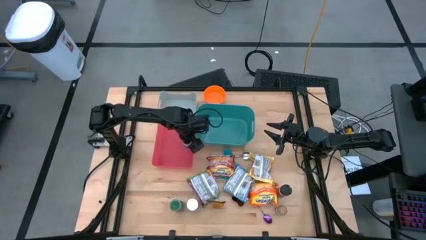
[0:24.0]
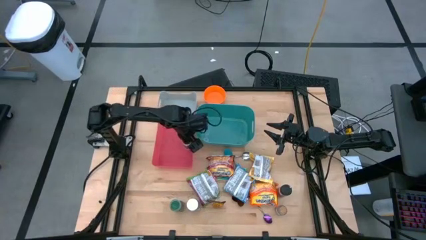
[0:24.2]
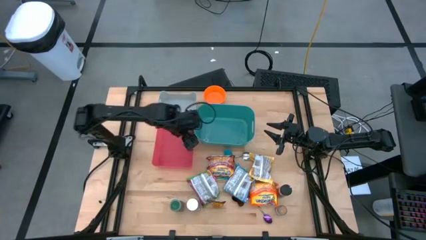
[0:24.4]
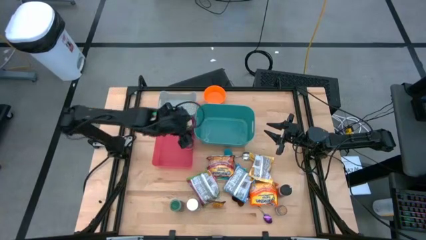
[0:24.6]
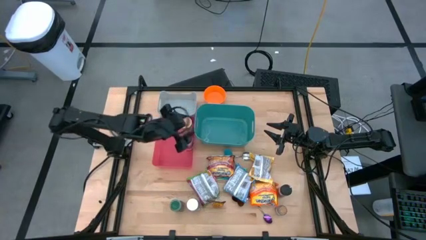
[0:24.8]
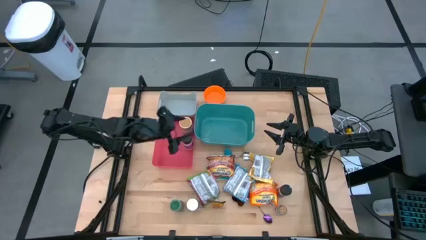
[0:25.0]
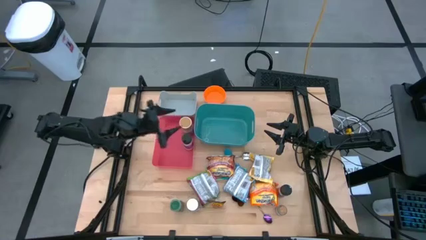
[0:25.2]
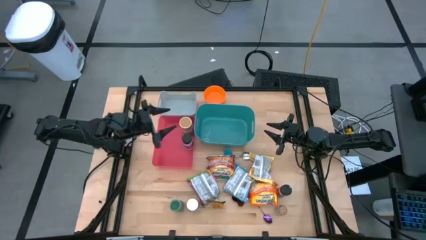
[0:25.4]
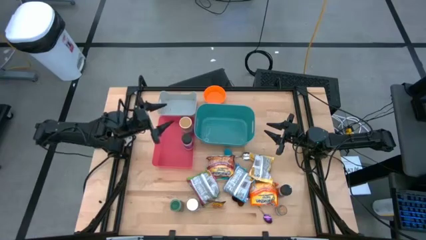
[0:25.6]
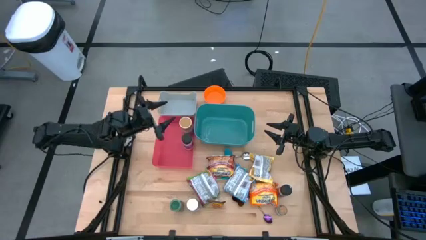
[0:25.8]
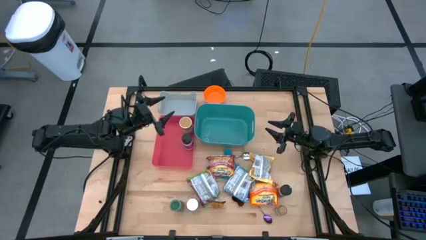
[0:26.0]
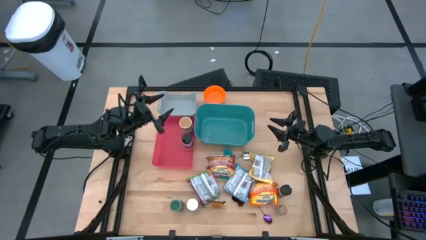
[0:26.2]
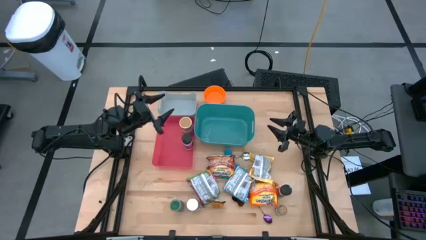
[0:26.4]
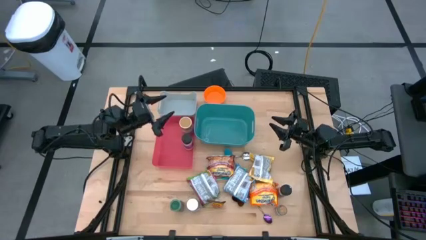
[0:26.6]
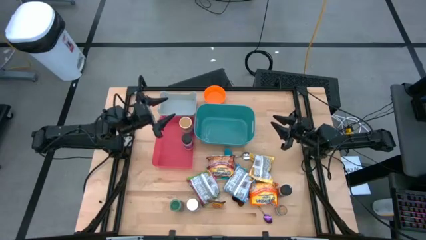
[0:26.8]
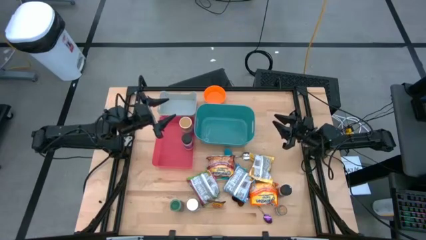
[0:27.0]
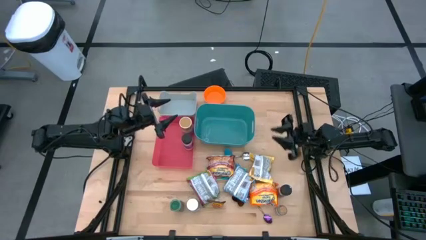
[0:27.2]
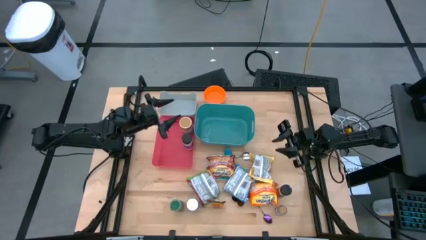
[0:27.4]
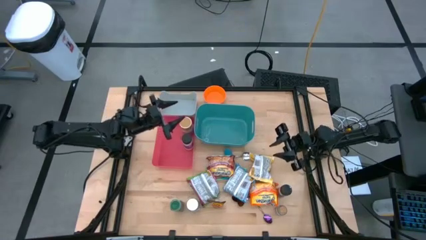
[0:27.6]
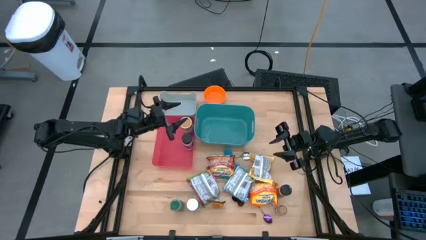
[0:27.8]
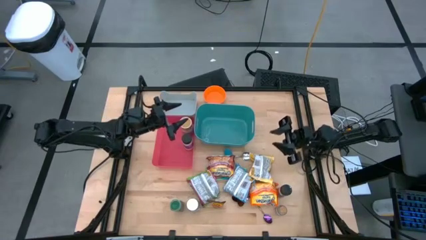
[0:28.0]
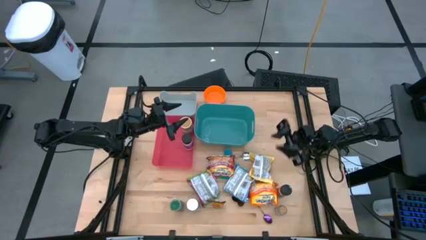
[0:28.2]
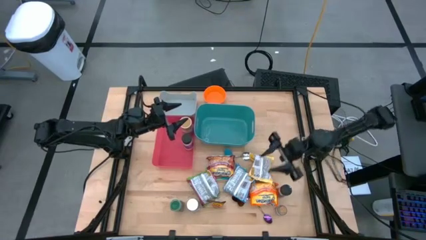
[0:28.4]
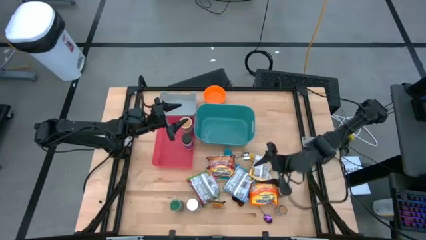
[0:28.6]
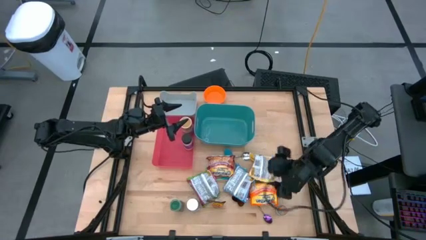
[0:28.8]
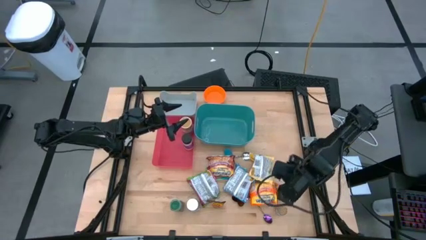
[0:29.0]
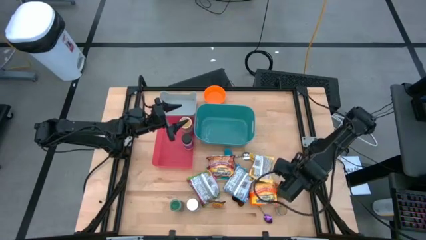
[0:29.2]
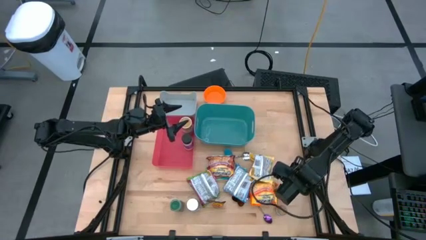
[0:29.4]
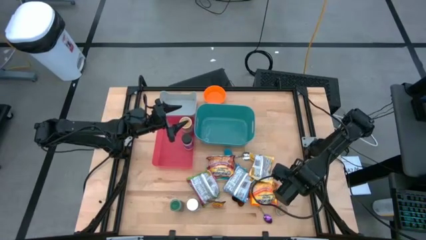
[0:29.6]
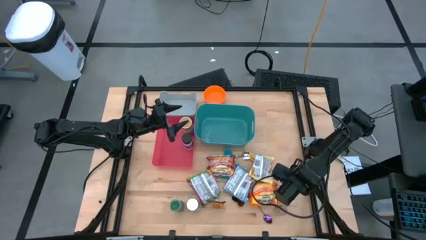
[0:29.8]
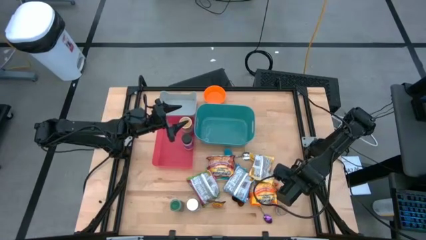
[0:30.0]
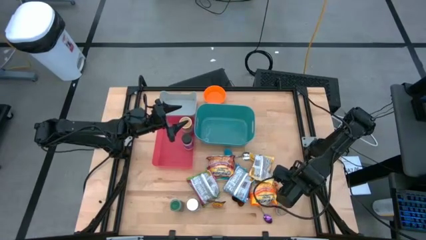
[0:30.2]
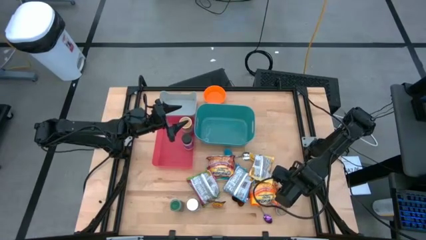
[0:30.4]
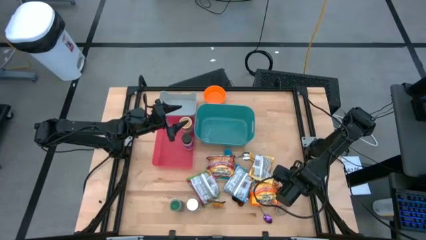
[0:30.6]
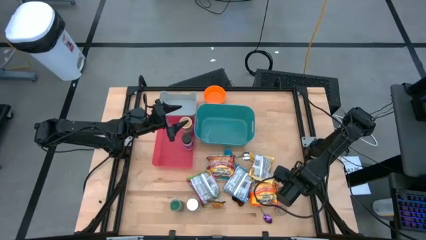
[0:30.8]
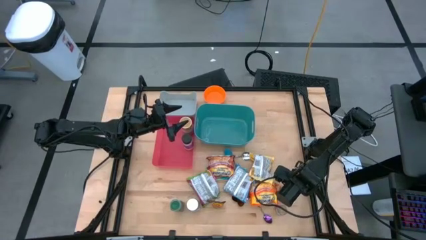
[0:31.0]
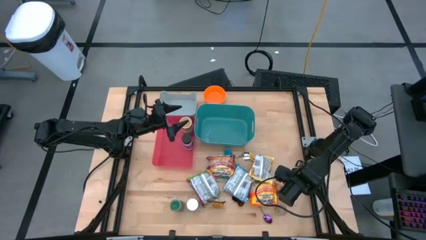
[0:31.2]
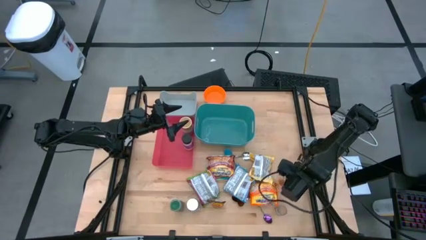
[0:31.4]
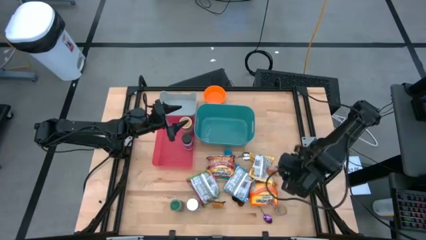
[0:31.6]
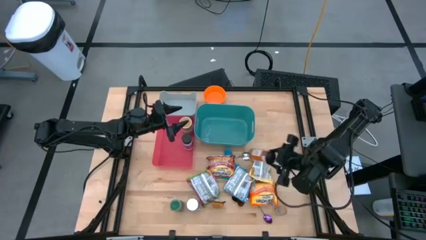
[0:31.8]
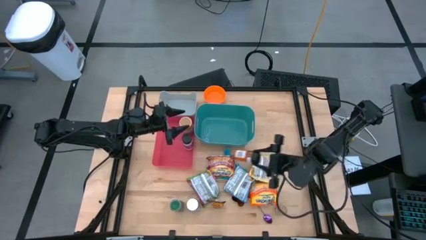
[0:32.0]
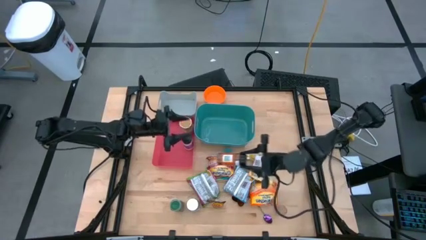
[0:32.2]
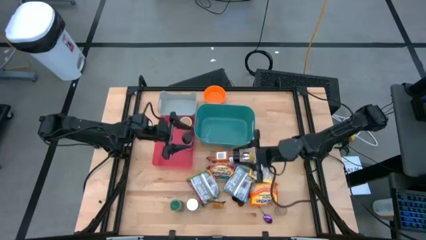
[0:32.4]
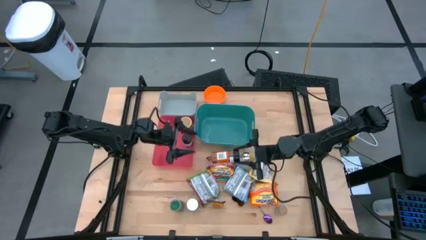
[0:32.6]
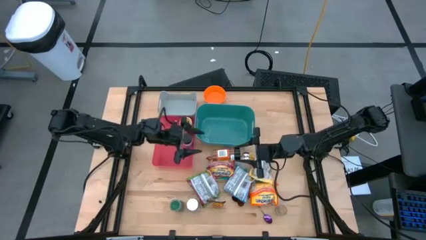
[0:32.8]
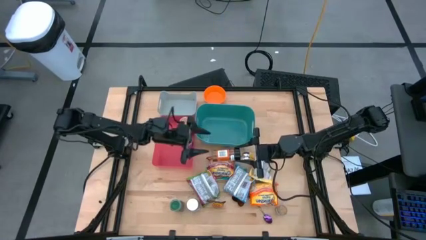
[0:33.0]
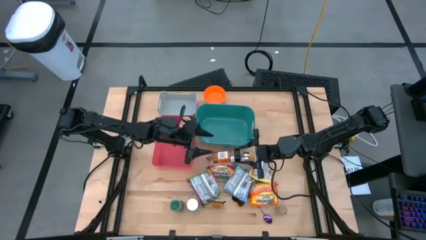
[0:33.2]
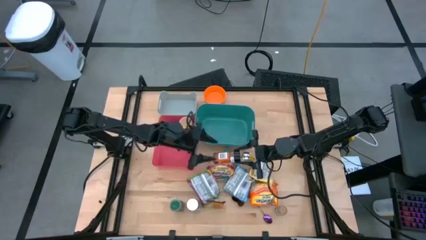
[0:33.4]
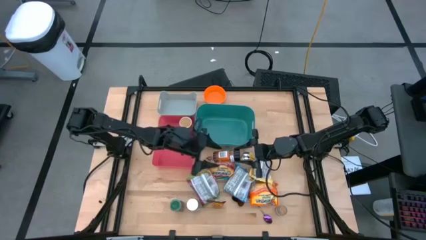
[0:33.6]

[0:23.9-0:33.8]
Task: Pick & Place Food Item
Put the orange spice bottle into the red bin

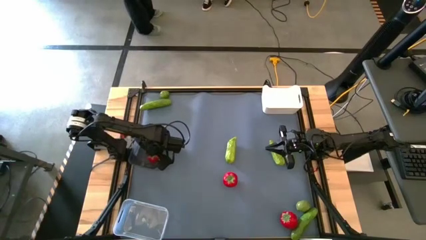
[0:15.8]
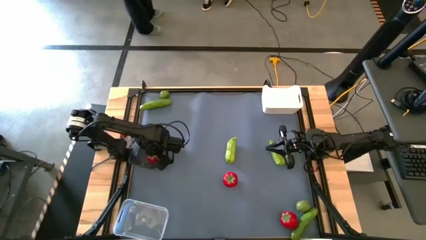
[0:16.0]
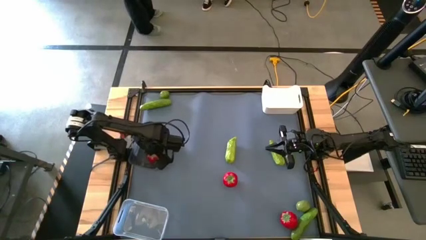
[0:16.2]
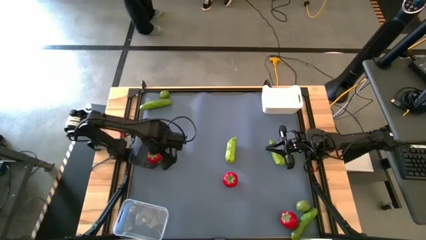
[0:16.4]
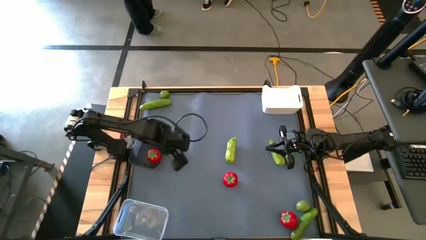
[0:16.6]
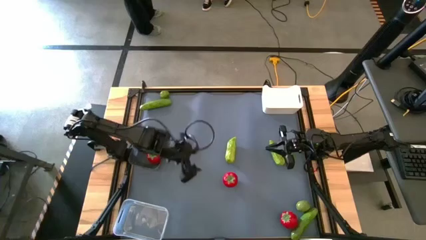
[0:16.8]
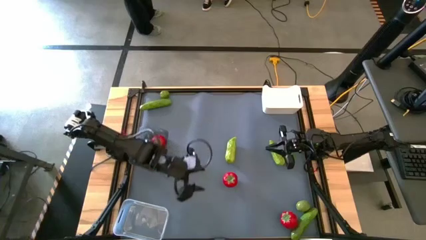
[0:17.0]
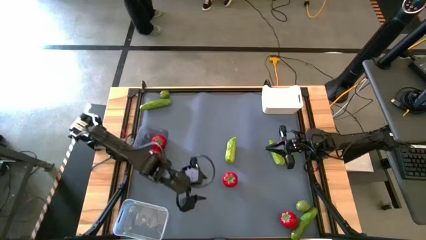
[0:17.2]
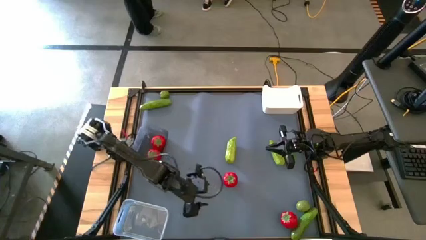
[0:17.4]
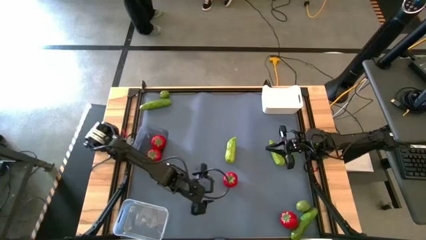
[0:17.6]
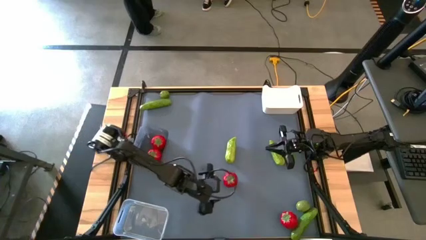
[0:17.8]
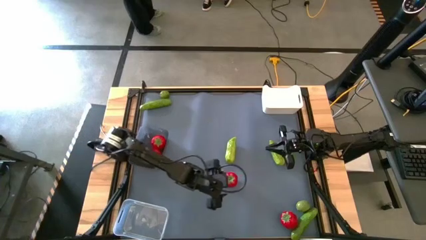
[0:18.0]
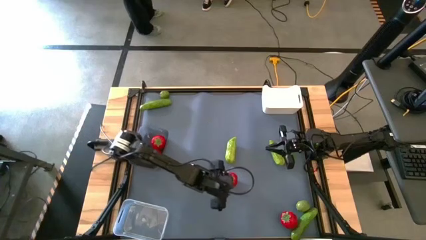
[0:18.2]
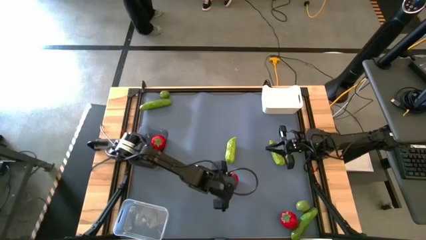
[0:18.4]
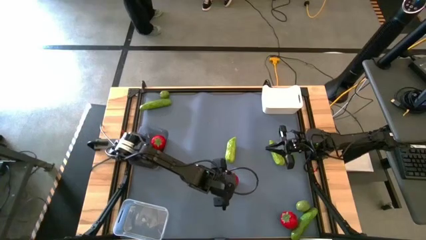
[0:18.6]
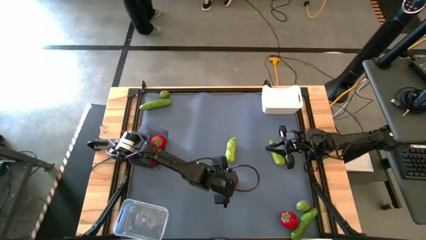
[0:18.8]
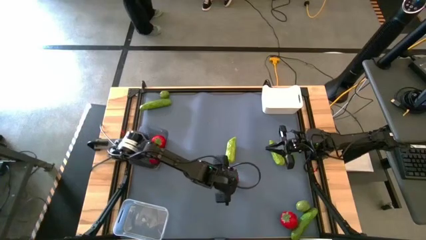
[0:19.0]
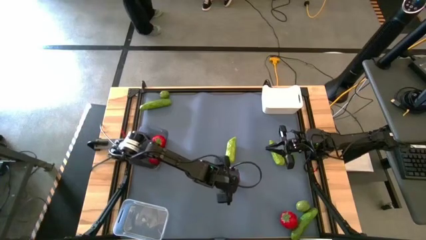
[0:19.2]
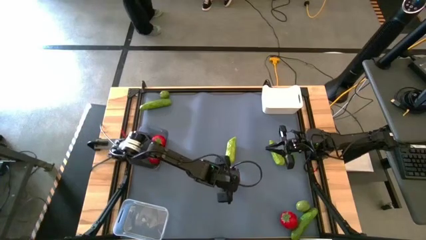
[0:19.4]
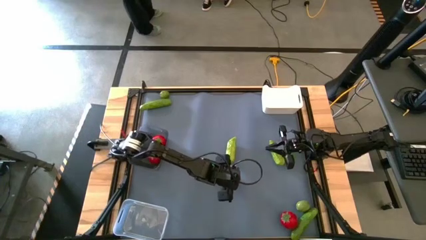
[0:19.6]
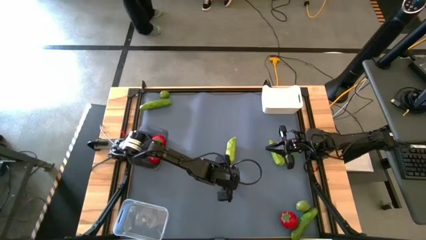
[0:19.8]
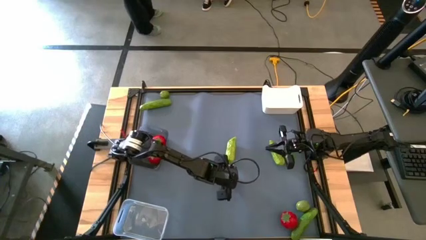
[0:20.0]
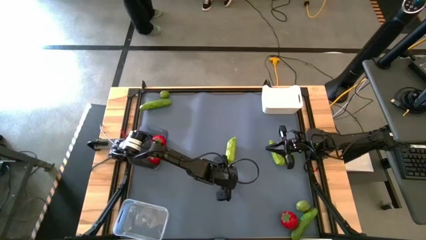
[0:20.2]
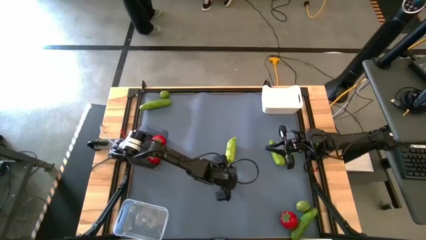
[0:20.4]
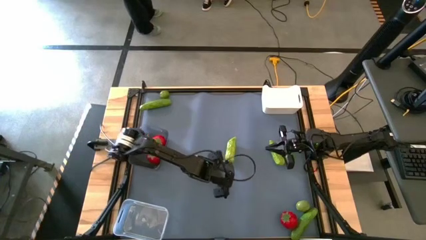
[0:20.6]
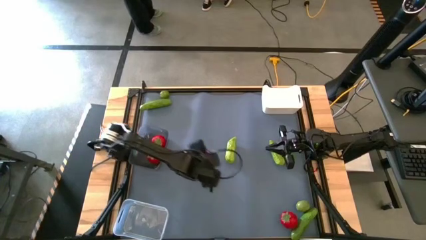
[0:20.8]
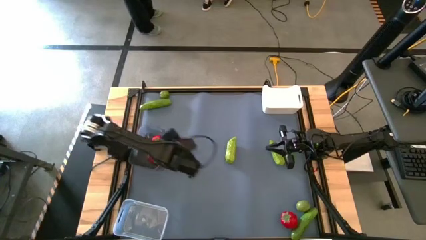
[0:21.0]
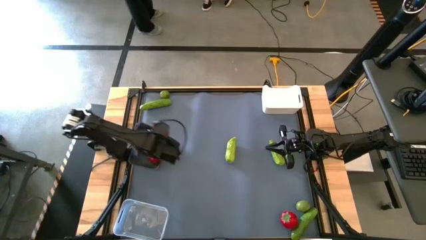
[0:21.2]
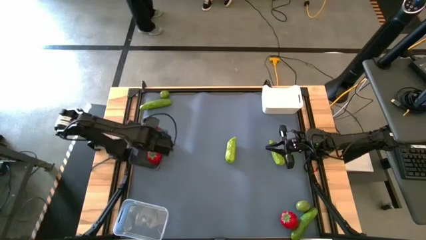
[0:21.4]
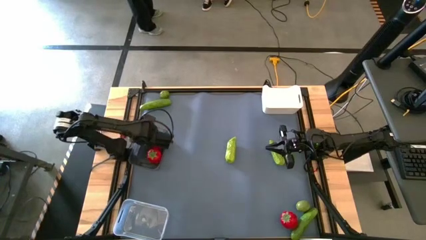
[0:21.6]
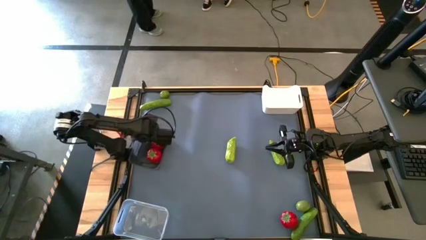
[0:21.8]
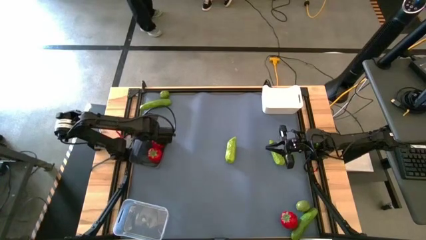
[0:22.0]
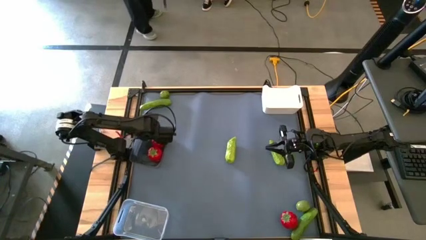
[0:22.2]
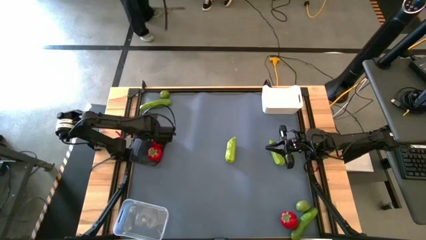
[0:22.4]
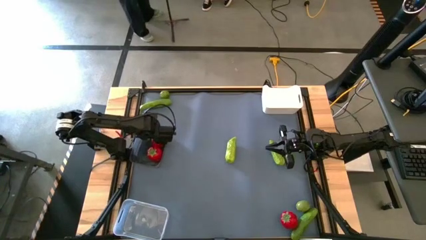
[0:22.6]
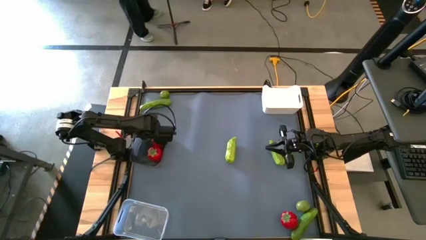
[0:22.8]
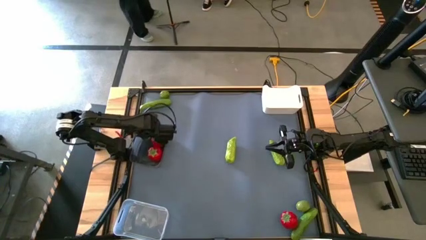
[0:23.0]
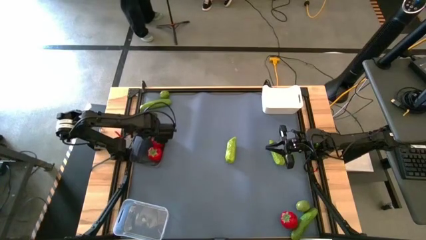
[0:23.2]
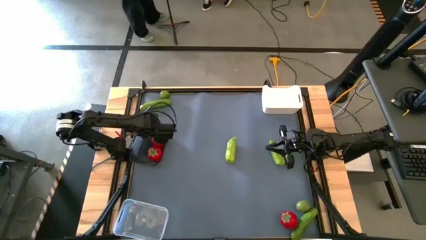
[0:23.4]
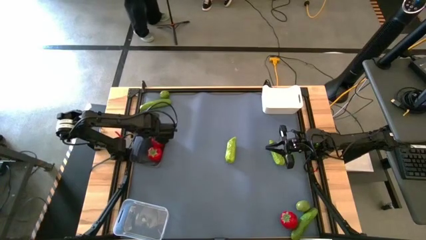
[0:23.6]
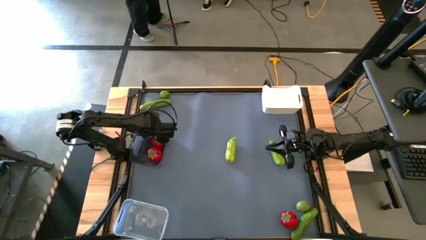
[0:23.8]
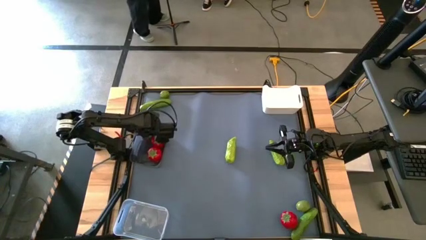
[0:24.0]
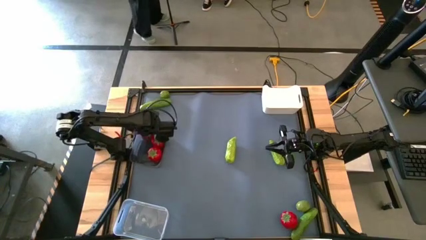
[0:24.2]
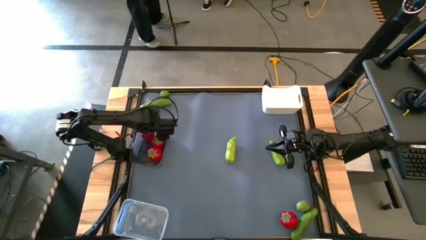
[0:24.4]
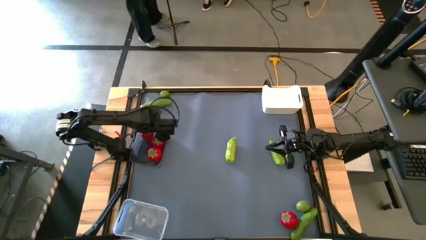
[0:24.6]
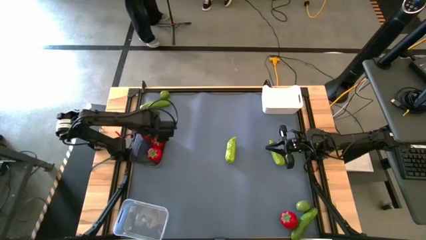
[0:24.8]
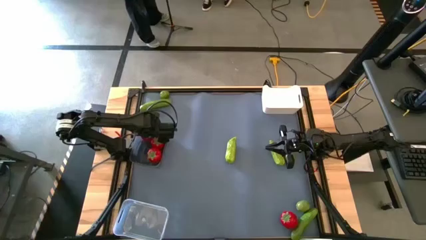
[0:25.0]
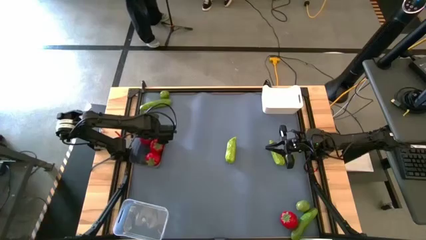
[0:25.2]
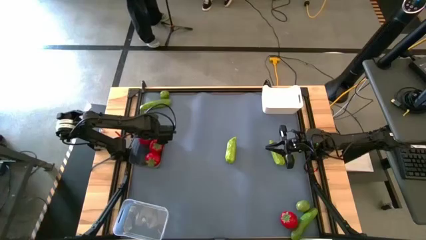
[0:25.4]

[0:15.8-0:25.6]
Task: Sort produce into baskets
Put the top tomato into the black transparent bin
